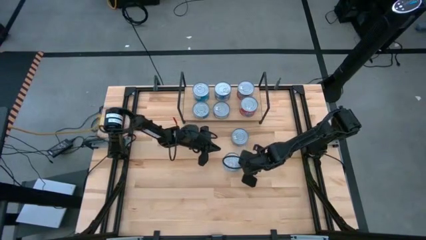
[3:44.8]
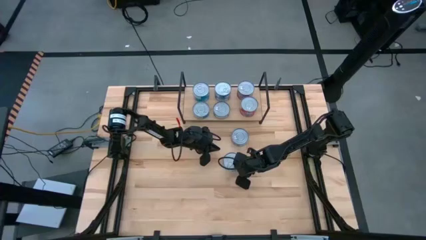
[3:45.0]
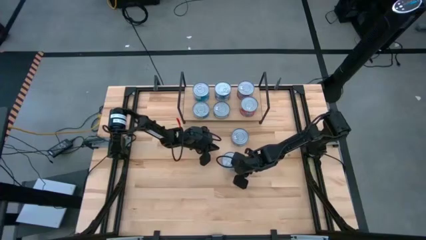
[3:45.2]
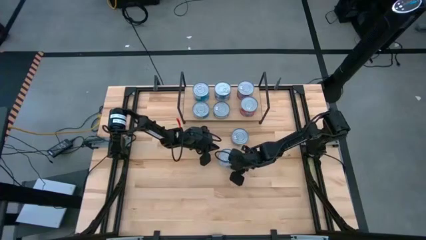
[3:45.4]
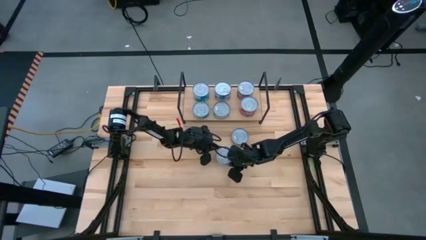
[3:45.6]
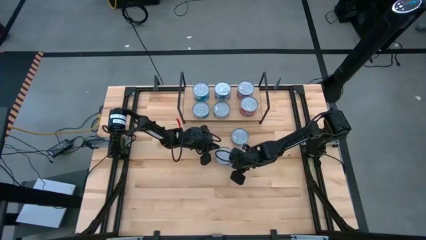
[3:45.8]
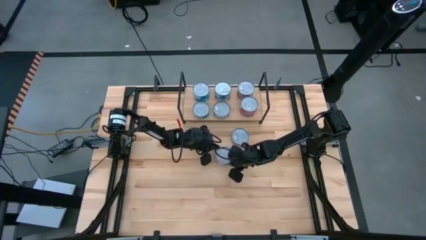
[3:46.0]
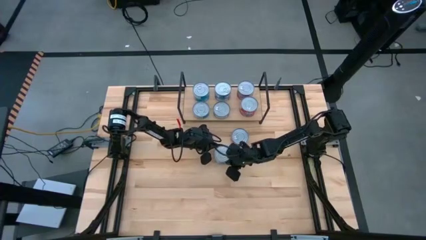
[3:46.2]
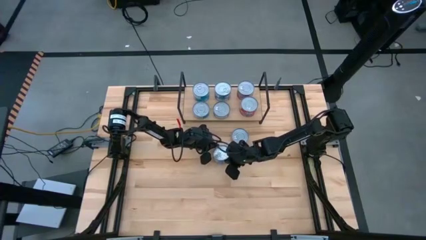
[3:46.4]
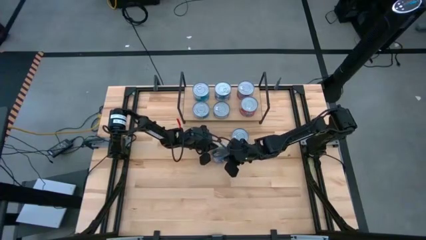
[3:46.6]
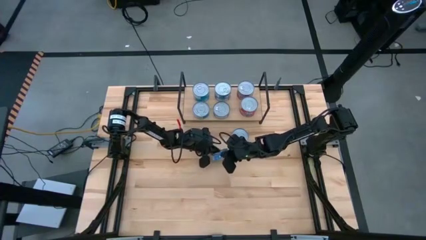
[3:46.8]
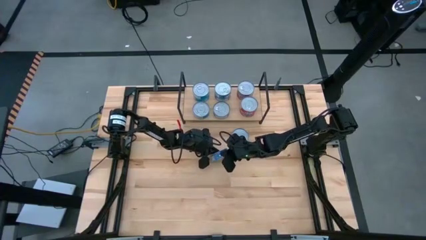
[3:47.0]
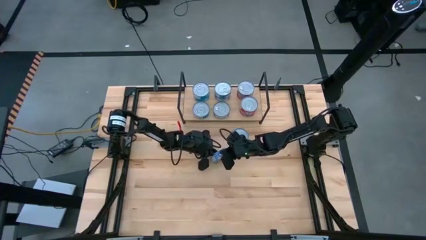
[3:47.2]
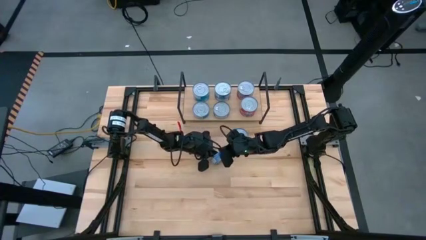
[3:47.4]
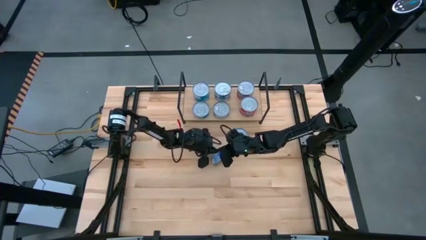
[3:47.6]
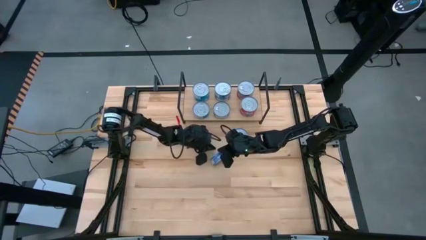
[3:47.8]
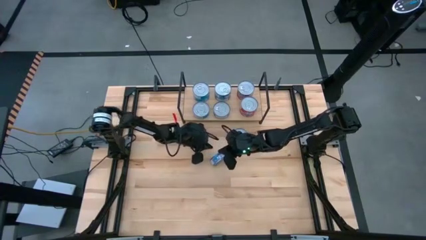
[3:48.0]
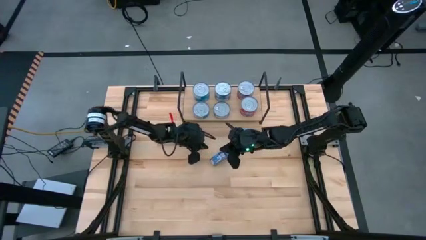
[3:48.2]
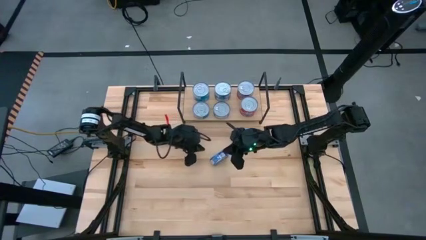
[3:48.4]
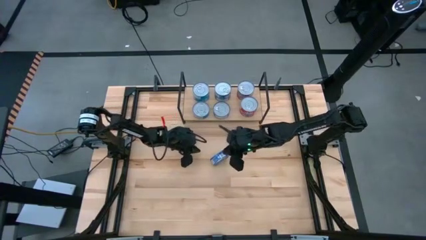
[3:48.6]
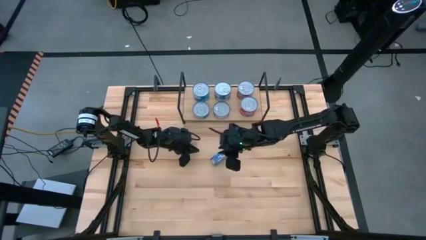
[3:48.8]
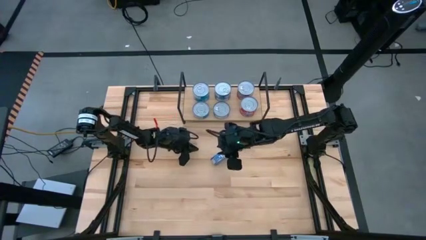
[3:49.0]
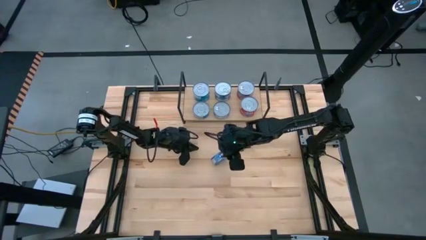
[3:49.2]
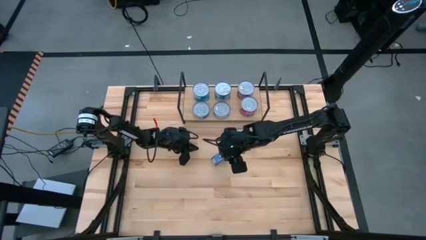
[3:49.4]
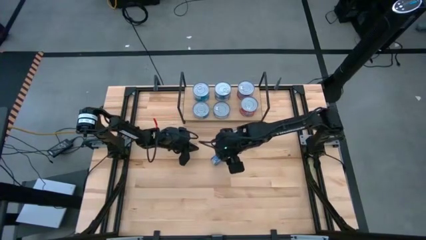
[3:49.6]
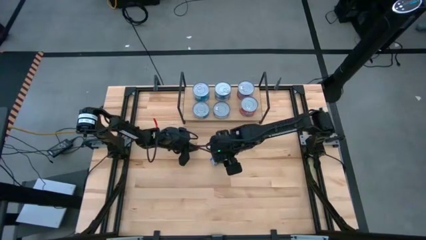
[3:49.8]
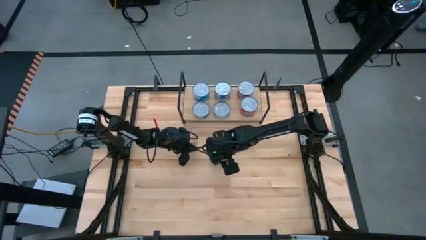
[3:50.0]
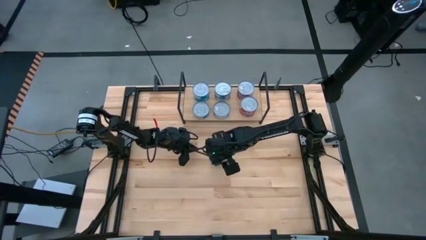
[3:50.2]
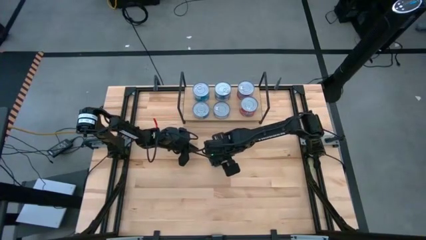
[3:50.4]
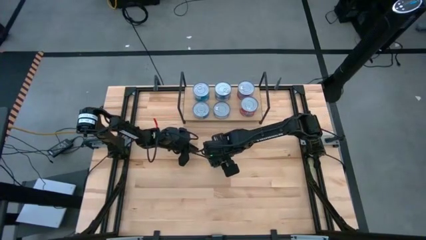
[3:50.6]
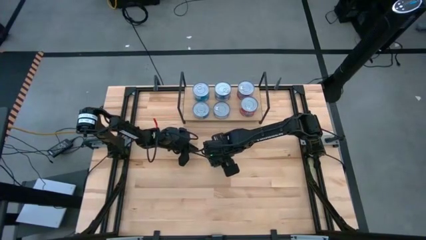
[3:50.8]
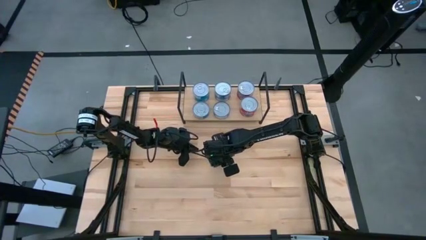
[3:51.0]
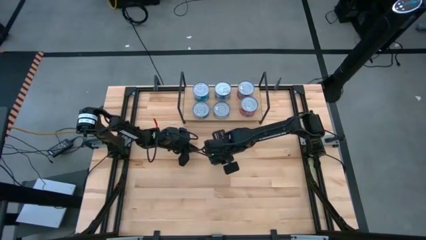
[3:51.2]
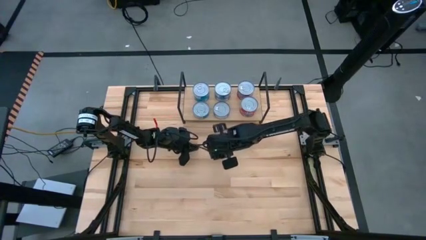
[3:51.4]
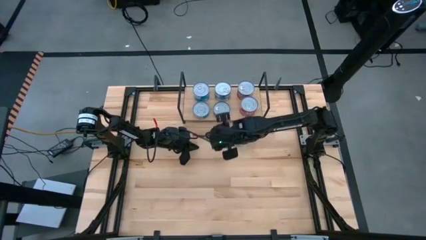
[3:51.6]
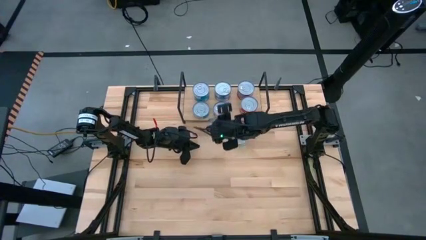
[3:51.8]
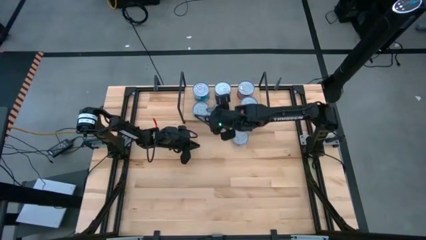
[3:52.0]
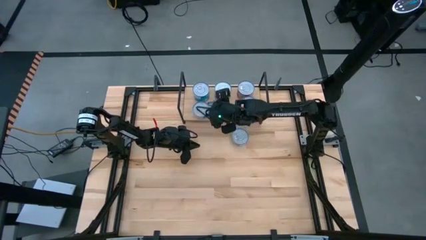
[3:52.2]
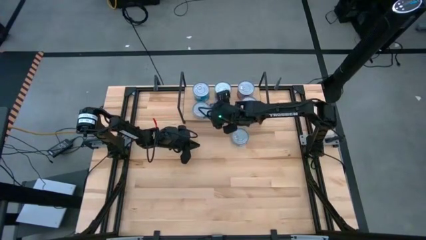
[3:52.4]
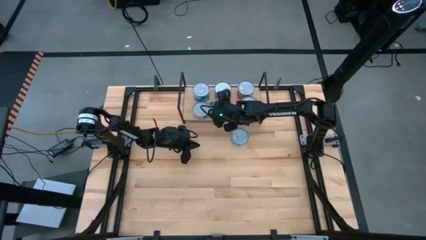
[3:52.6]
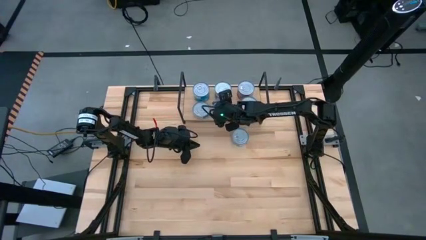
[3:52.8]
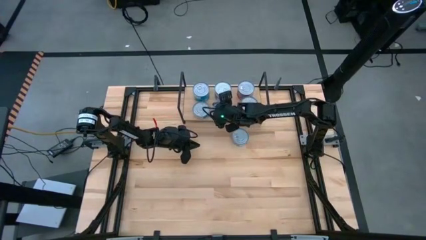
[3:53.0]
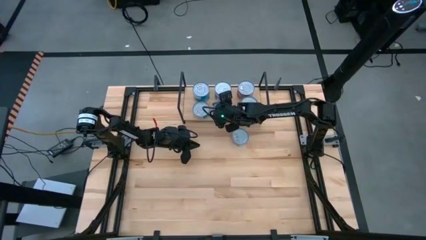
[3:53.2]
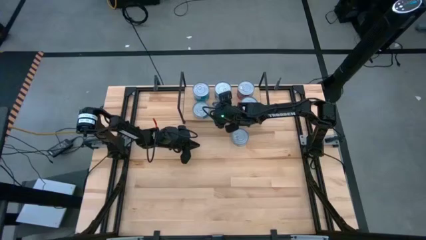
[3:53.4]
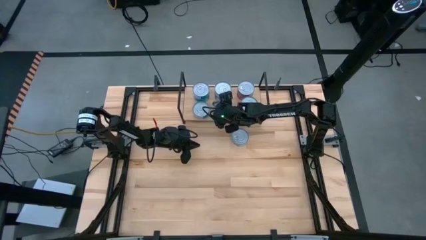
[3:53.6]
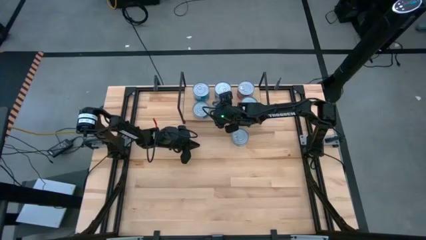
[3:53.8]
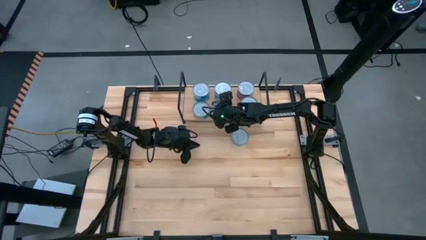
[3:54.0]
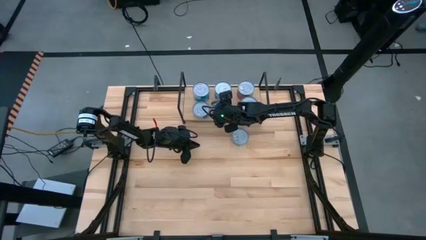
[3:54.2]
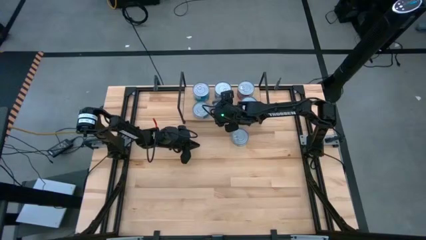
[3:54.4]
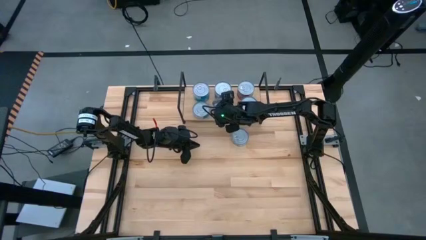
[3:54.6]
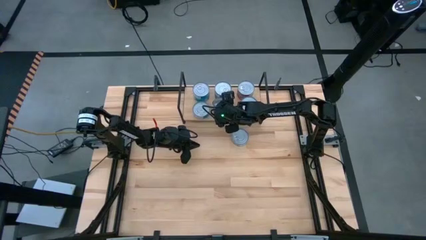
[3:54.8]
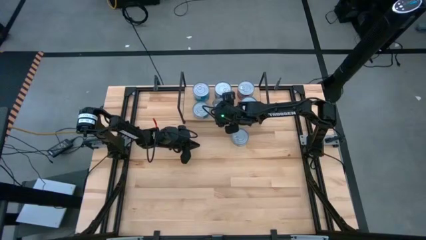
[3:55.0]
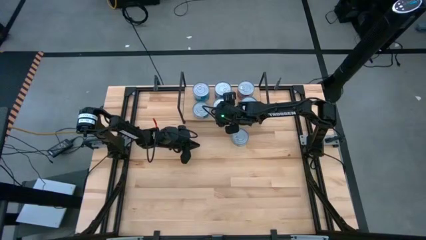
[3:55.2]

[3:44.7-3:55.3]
Task: Stack canned seafood by type on shelf
Stack the blue tuna can on top of the blue tuna can on the shelf

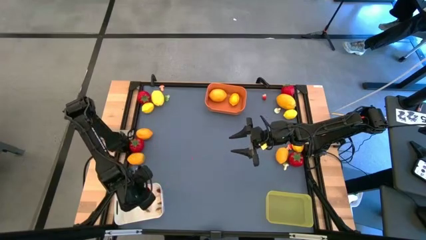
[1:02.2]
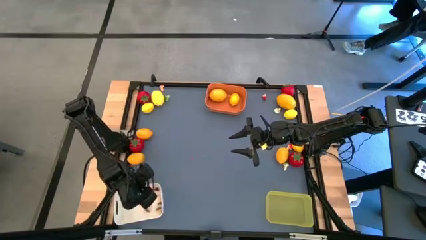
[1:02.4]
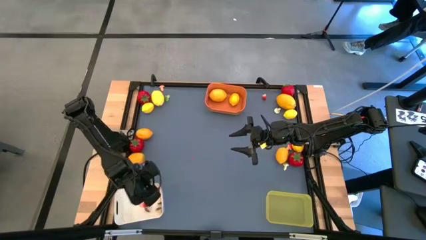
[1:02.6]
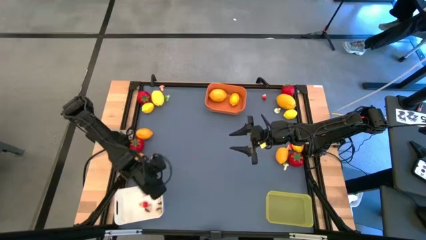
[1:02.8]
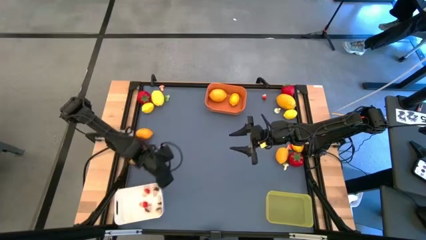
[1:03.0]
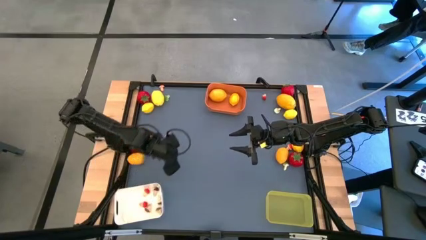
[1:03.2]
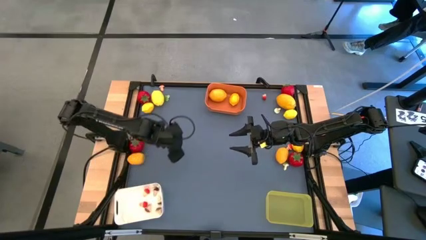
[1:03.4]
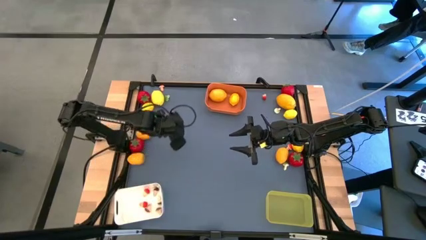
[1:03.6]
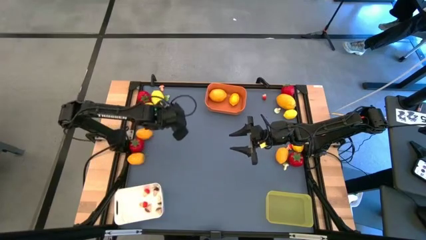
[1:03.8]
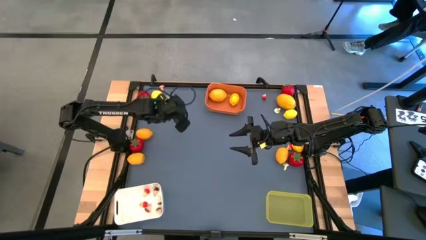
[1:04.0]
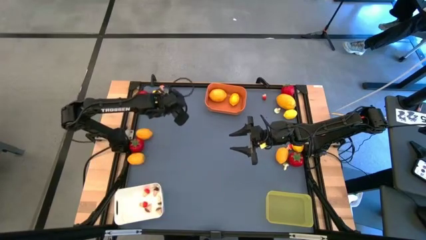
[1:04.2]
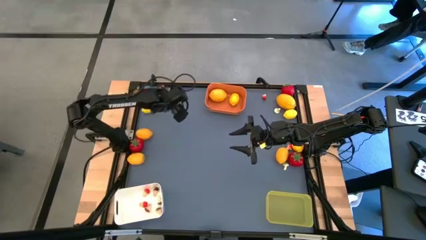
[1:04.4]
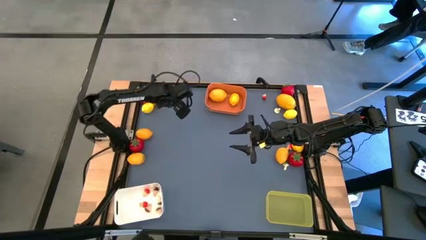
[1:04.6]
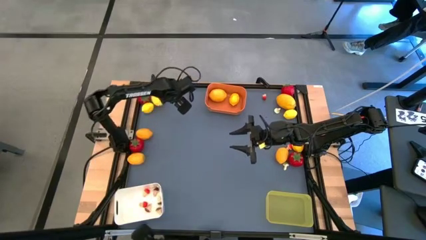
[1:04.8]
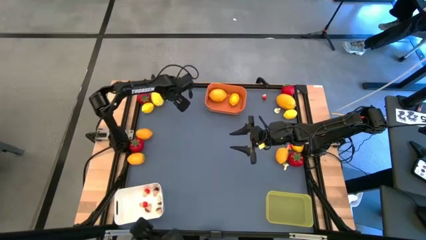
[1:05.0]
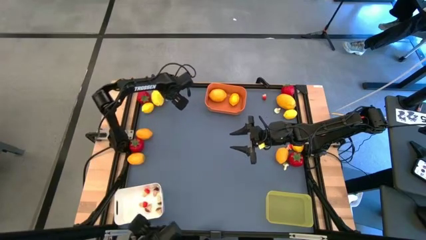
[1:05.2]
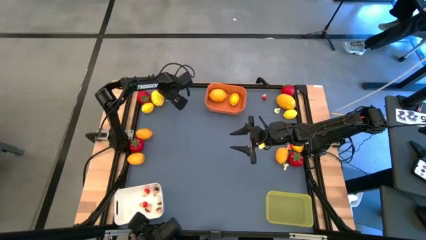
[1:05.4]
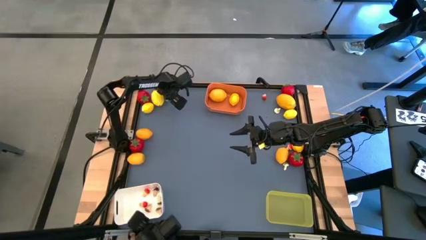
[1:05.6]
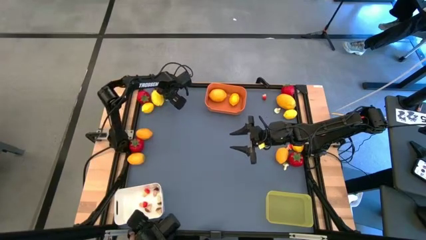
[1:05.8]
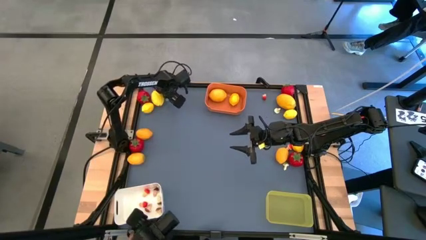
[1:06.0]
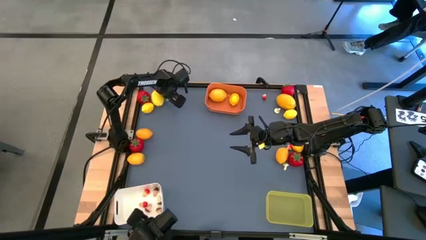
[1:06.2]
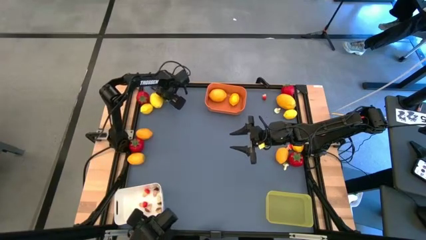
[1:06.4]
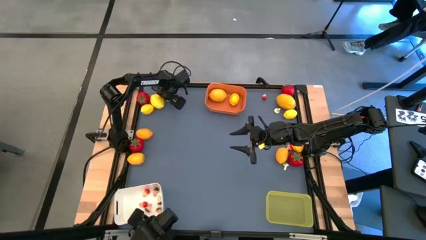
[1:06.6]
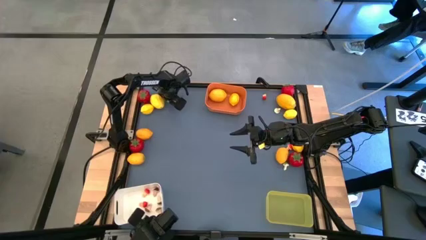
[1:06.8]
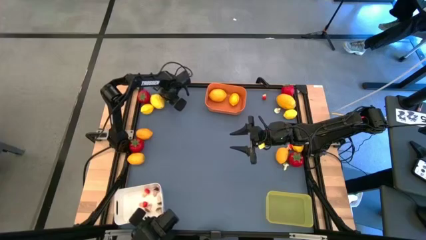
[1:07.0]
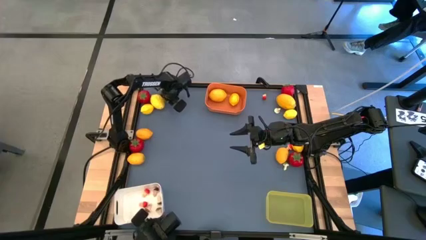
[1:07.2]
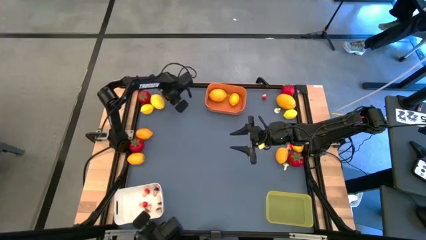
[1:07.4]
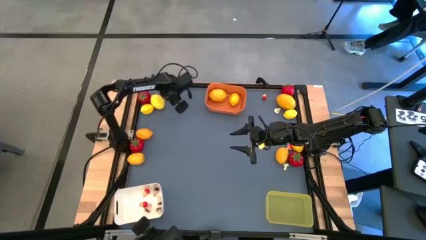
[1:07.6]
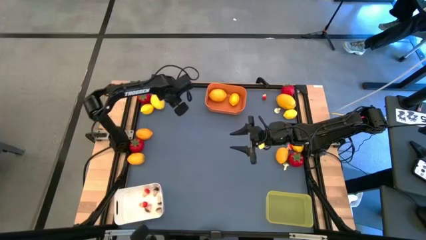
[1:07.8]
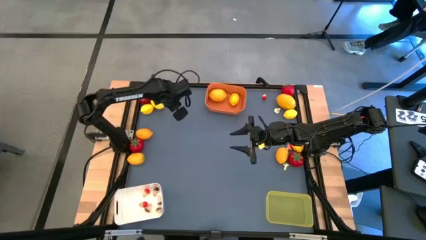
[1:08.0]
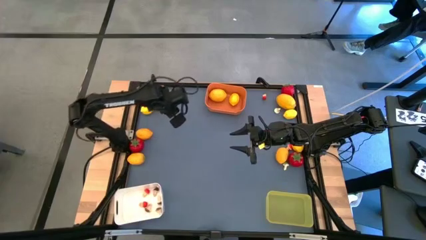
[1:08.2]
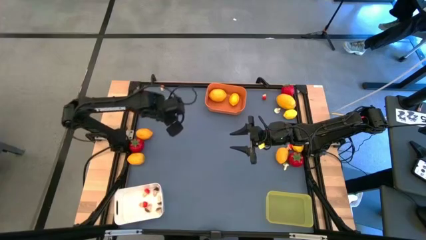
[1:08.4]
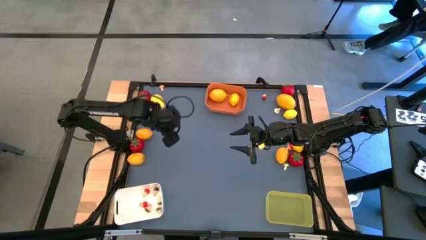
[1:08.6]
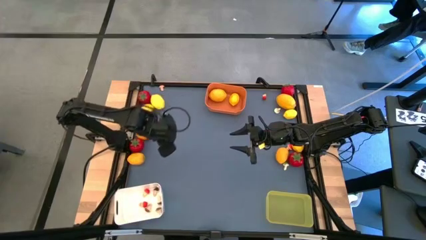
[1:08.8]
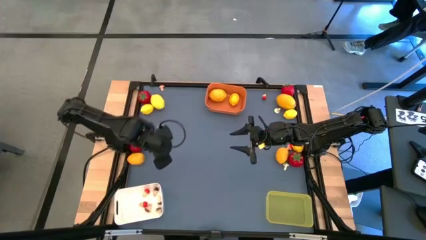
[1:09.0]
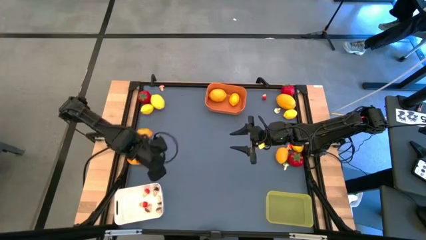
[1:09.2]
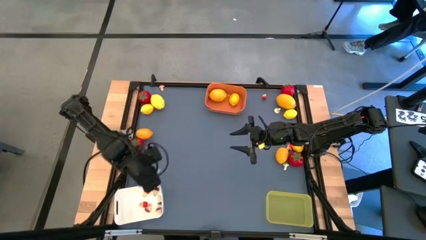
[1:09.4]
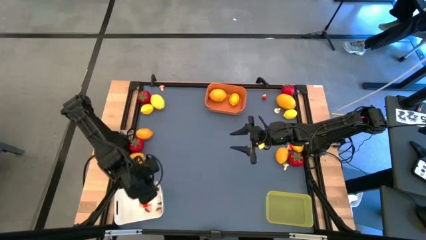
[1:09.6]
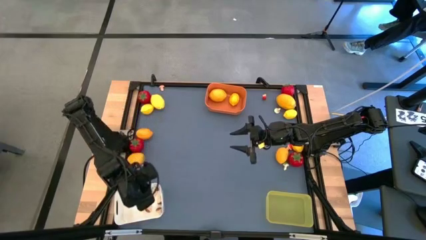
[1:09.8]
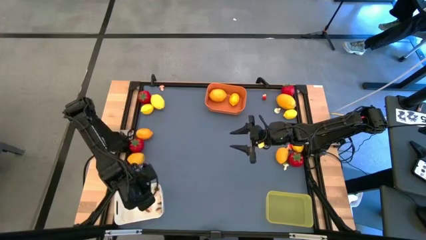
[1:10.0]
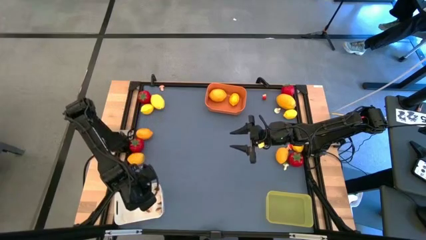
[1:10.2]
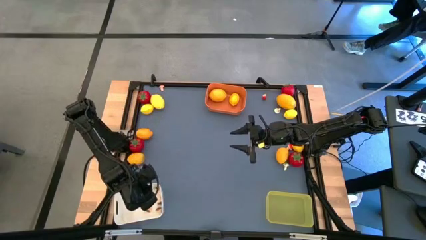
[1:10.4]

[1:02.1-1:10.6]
Task: Sort produce into baskets
Put the green mushroom into the white bin
